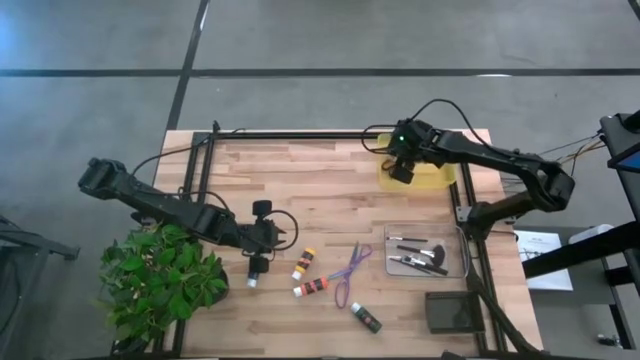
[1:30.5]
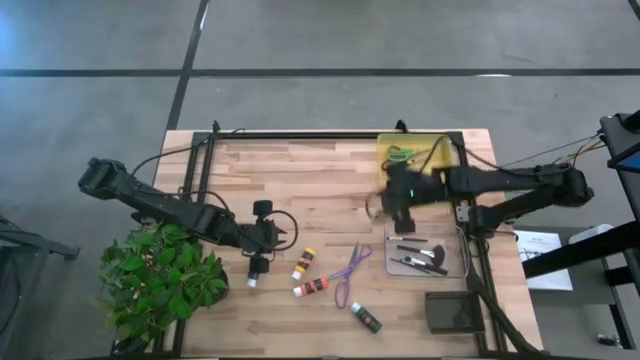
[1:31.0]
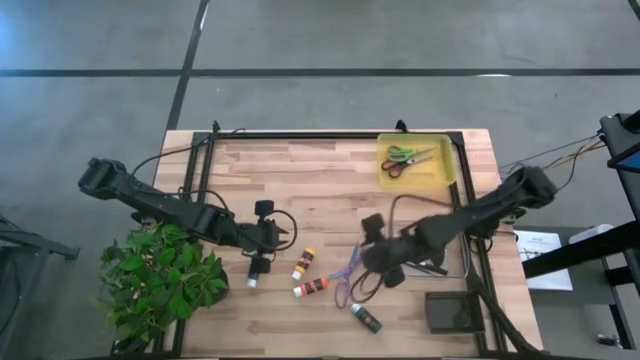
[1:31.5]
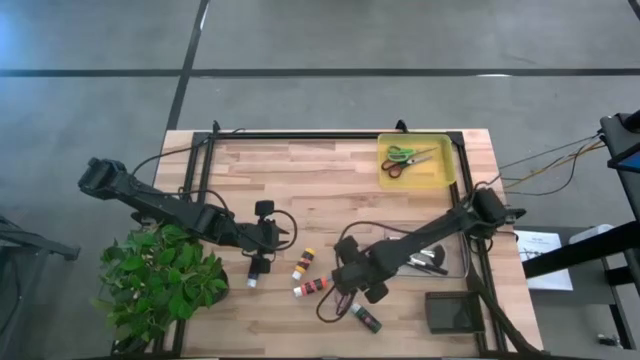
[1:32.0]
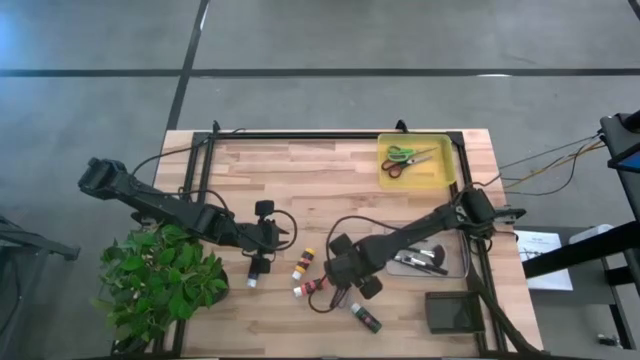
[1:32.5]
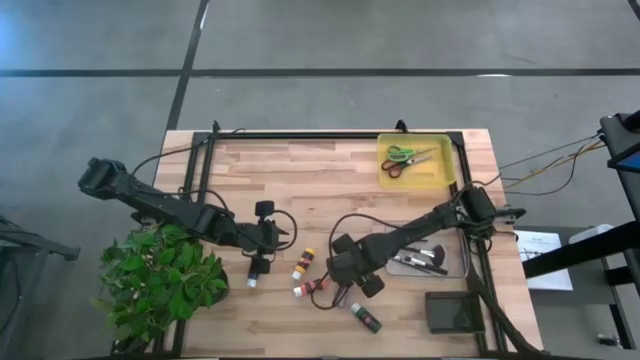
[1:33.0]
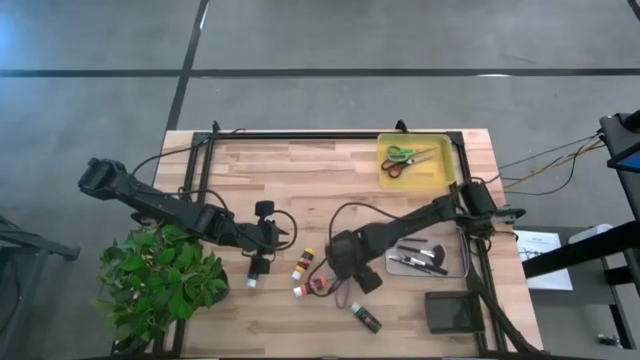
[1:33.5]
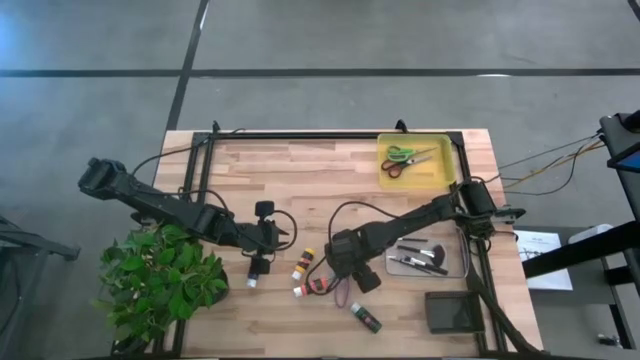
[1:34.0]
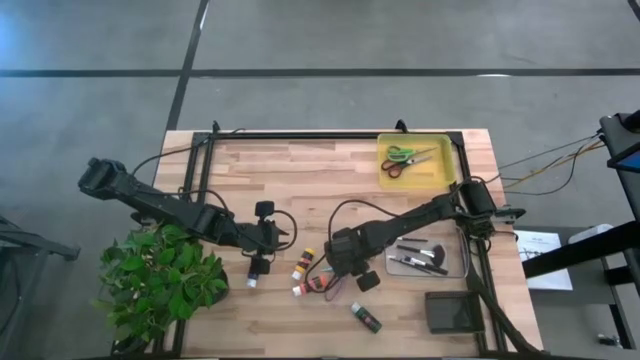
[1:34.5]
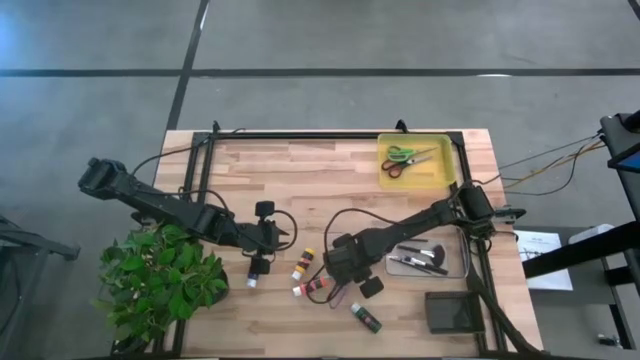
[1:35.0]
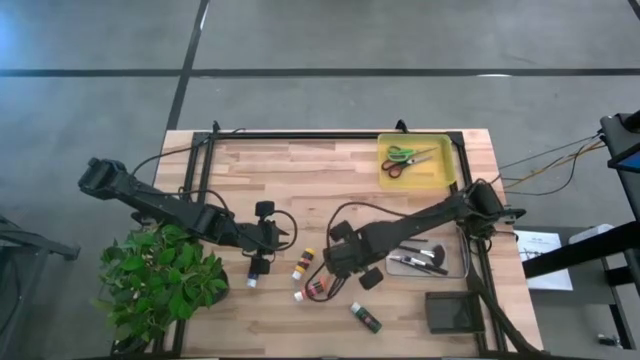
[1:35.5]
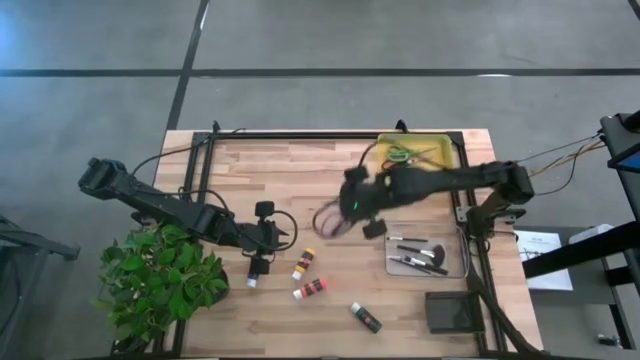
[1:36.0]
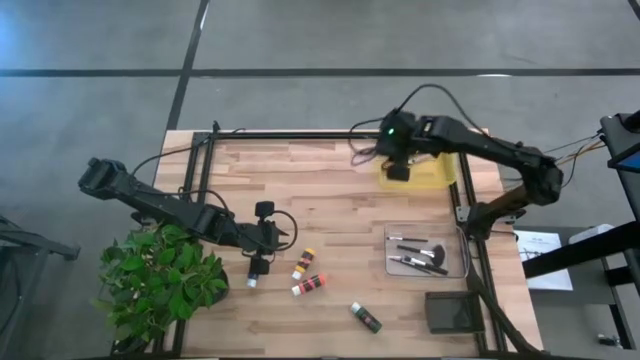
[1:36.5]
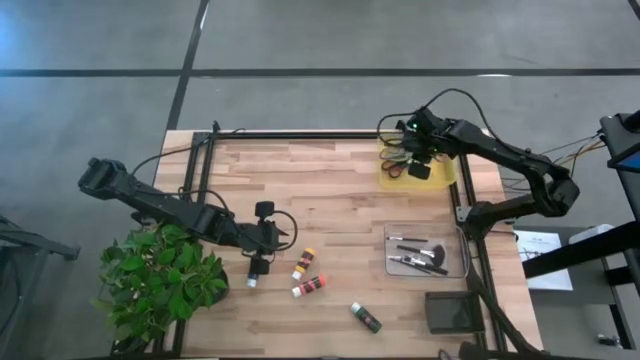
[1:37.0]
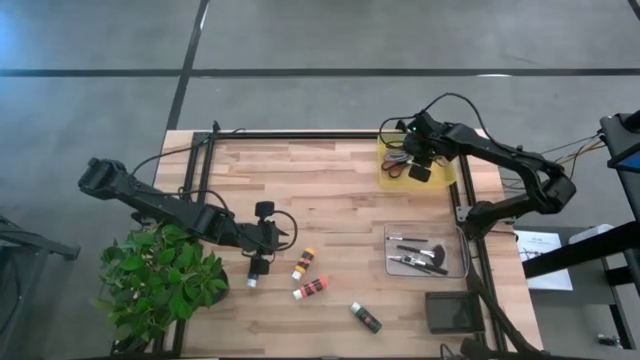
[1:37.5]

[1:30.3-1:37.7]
Task: Pick & Place Paint Supplies
Put the purple scissors into the yellow bin

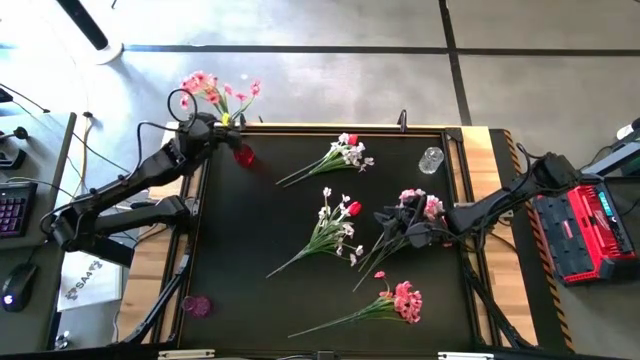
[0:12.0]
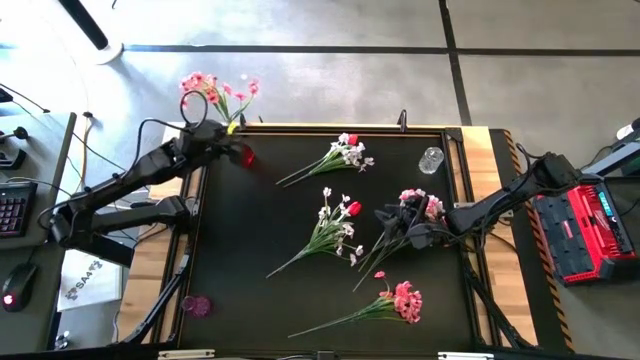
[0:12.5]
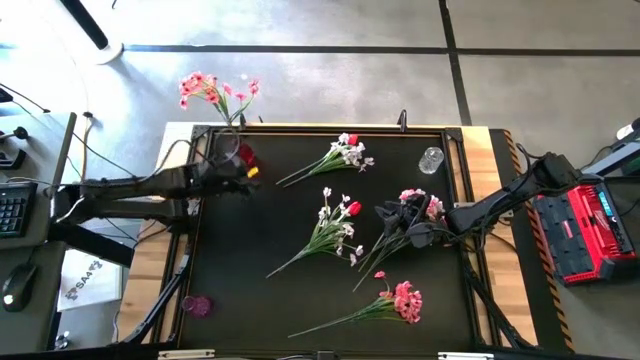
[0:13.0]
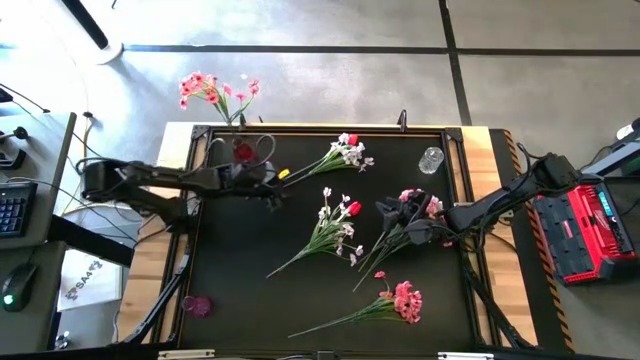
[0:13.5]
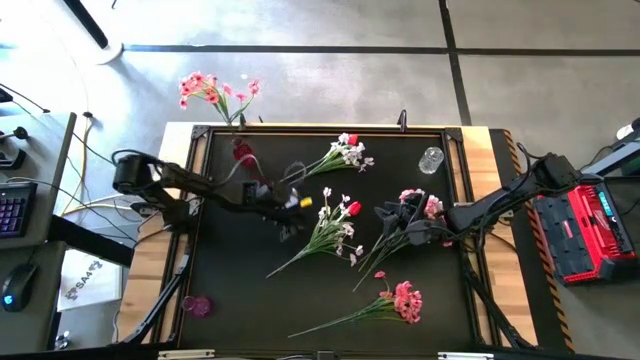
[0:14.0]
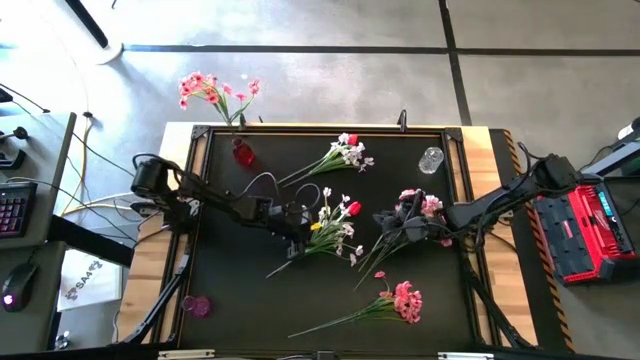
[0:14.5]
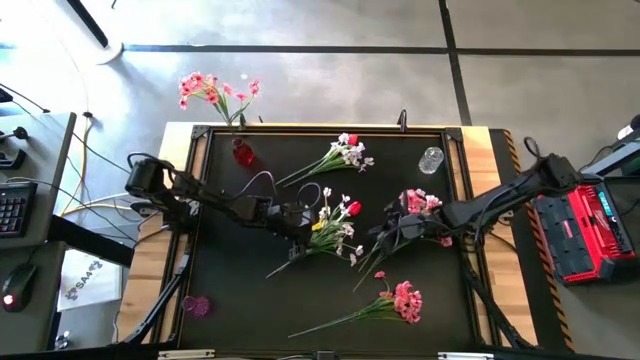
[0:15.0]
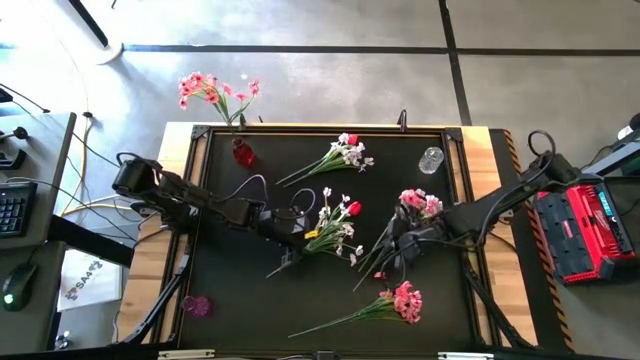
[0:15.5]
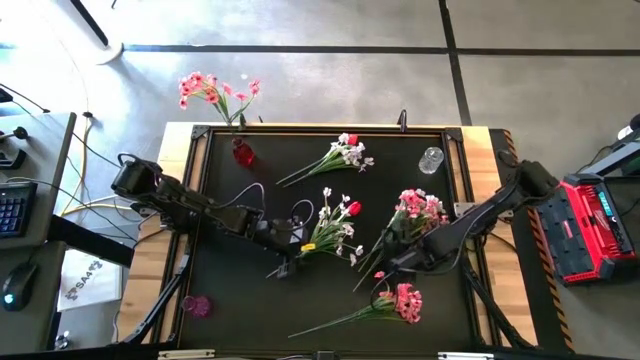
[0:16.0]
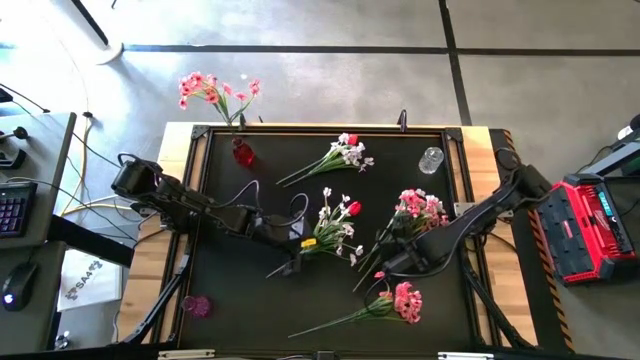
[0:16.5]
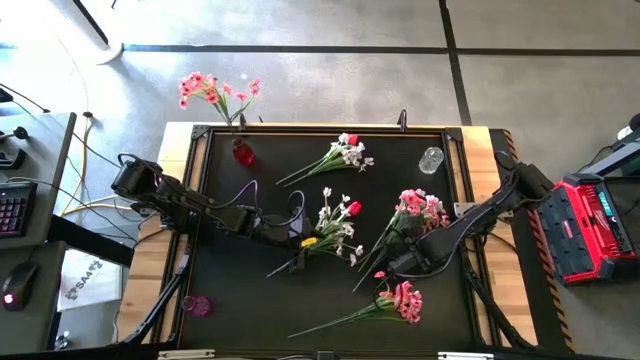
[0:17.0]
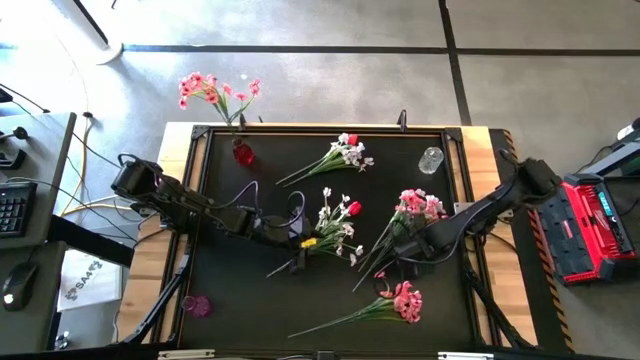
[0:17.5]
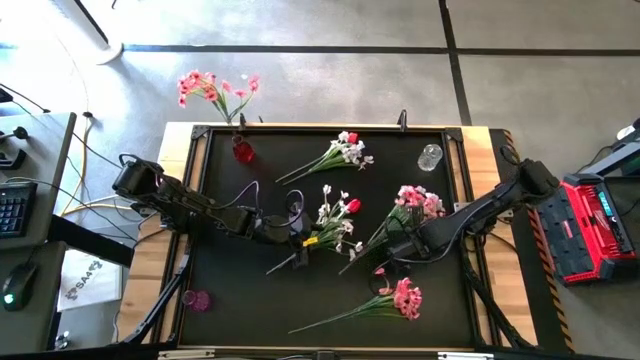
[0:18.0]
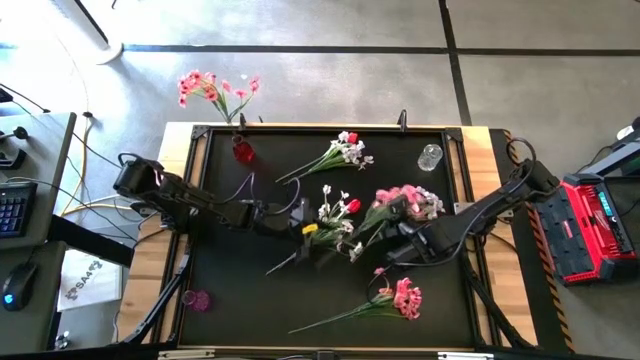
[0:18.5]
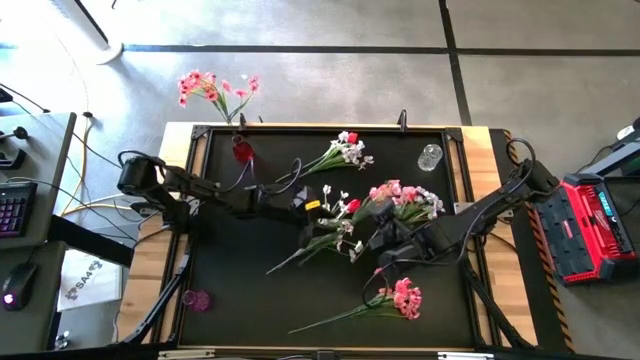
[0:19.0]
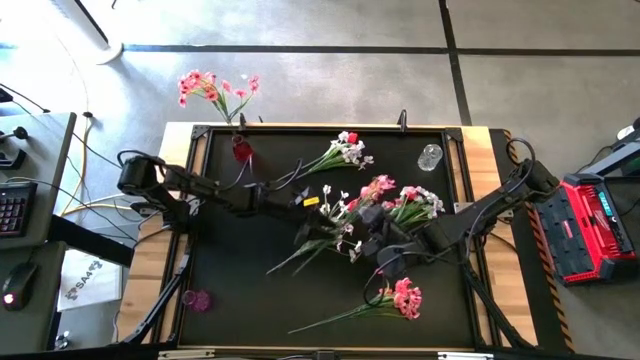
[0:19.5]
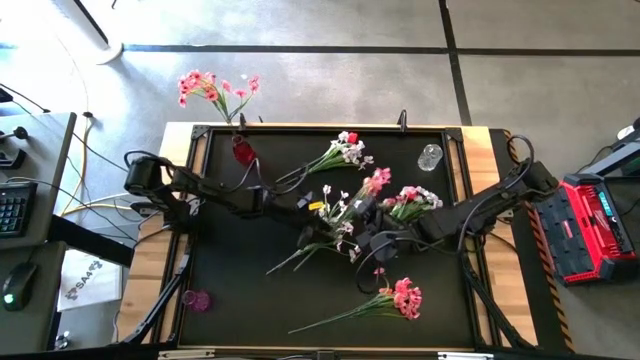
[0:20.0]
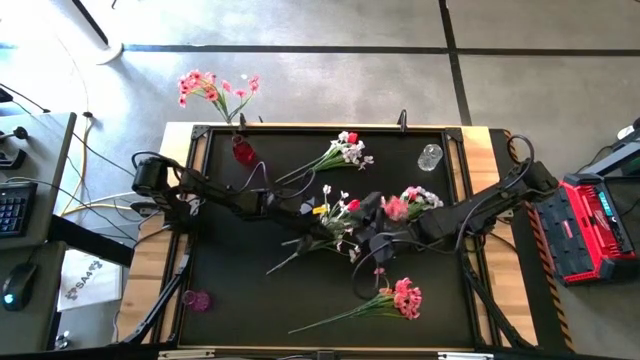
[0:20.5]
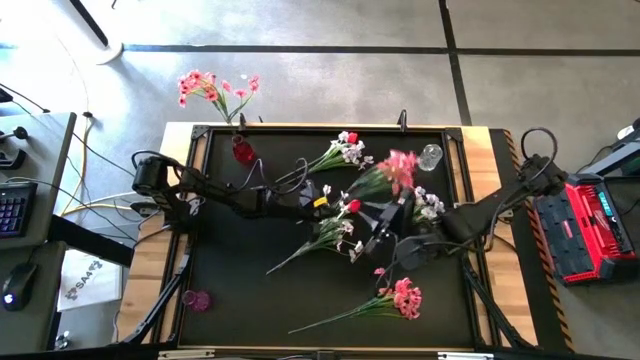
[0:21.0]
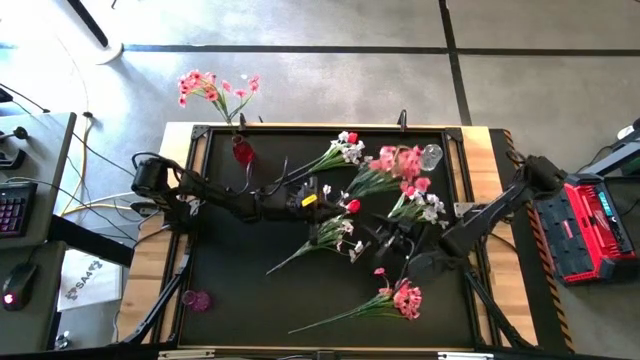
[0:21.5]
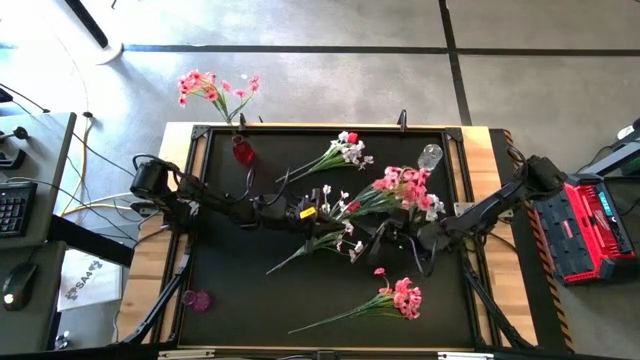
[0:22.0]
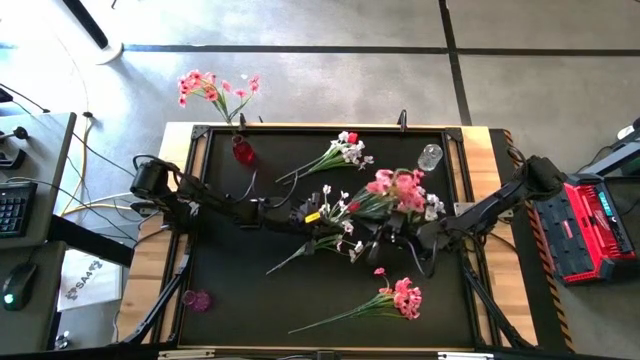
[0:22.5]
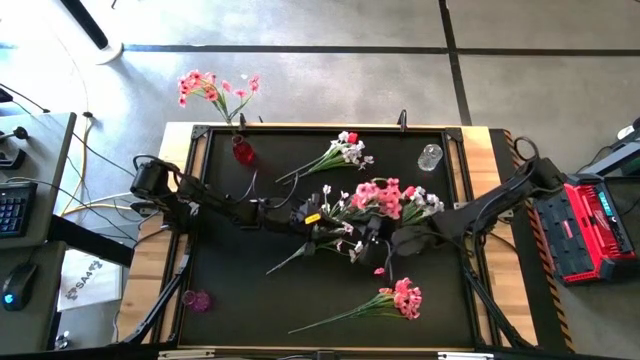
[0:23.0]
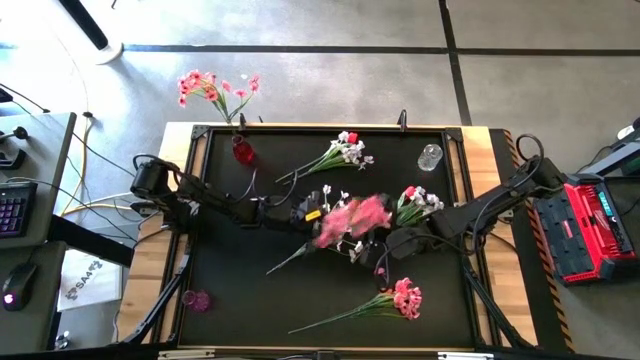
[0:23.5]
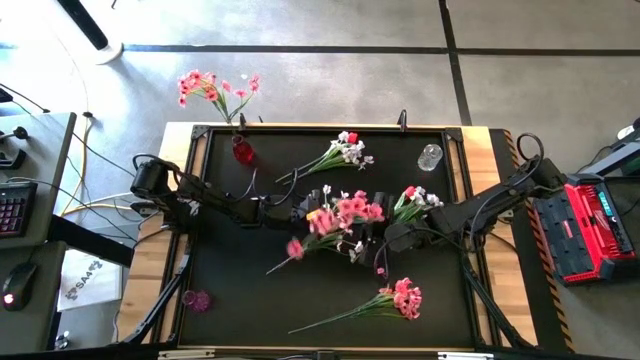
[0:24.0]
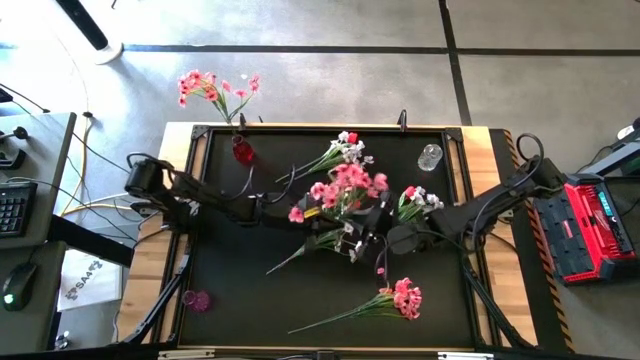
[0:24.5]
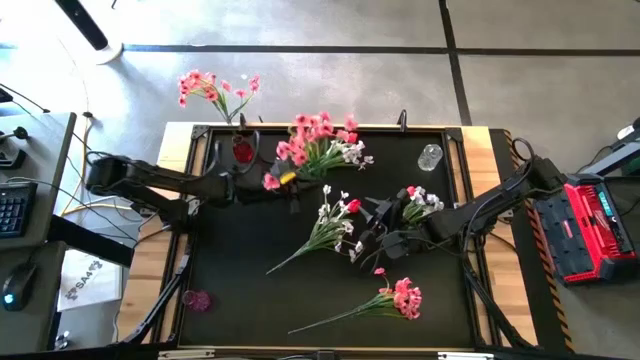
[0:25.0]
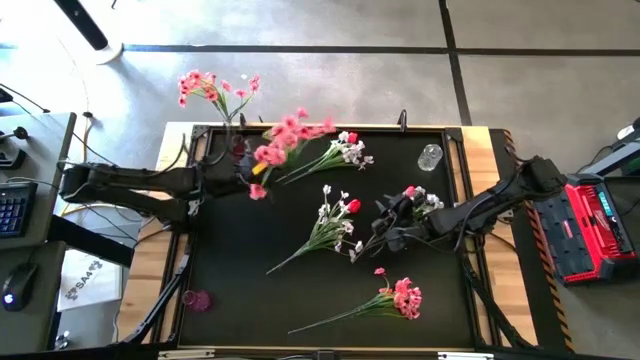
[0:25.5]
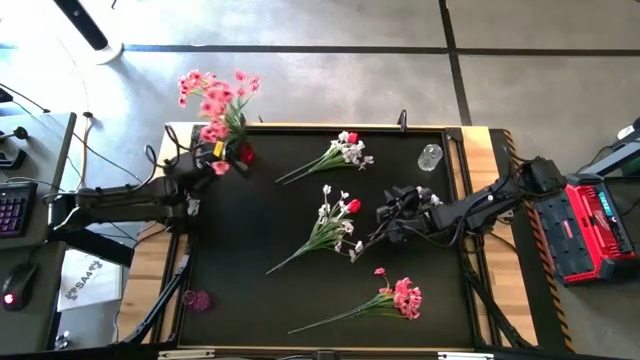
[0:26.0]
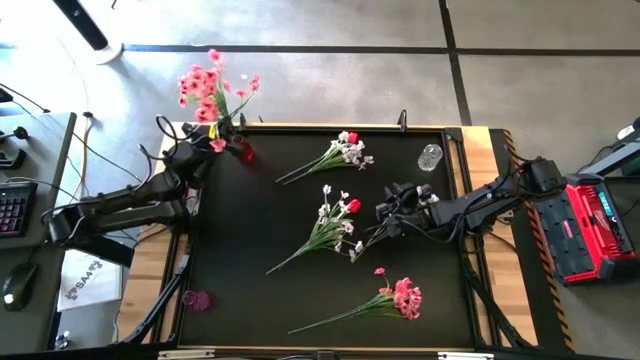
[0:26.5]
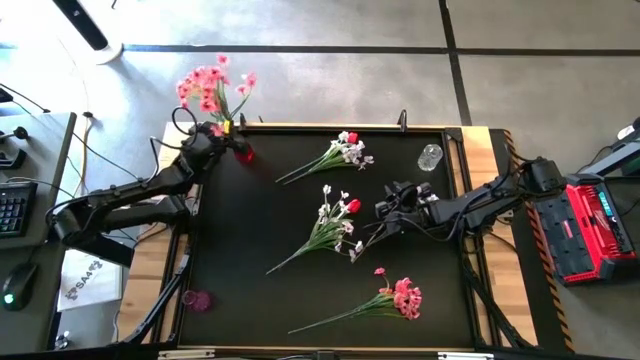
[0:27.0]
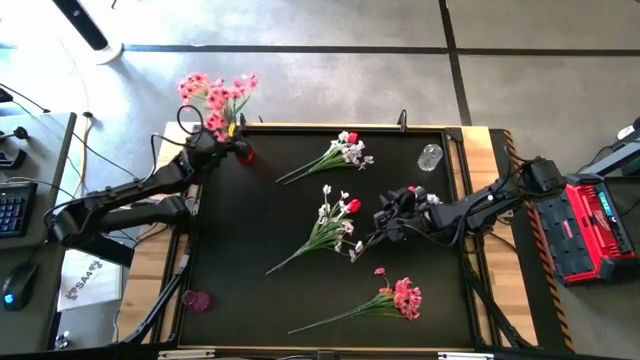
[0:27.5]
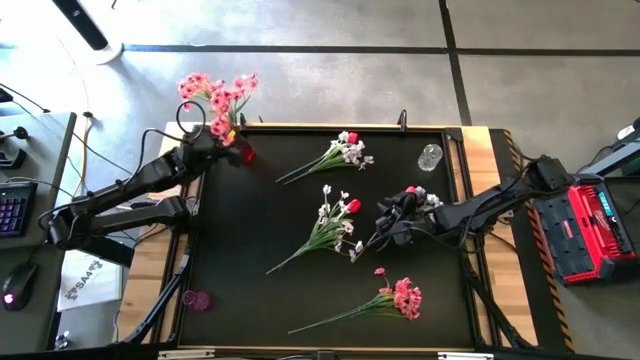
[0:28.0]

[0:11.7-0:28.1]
Task: Sort flowers into vase by color
Put the top pink flower into the red vase
